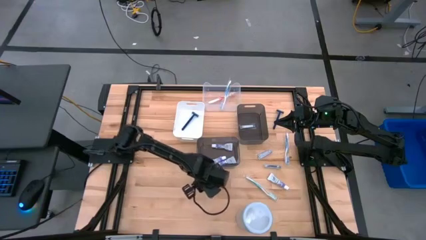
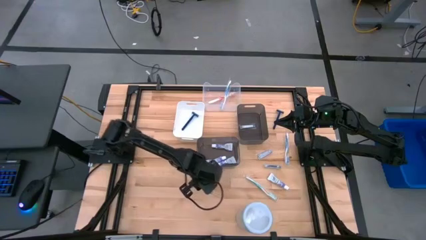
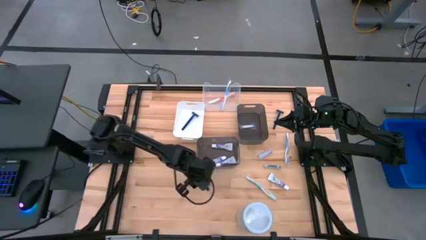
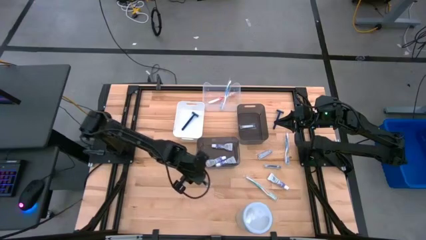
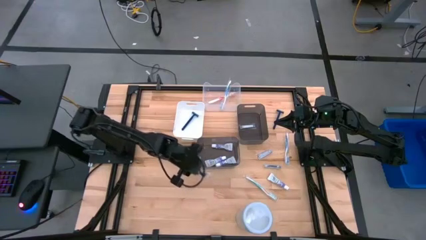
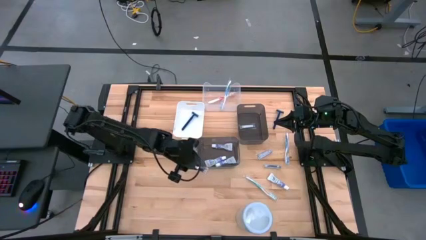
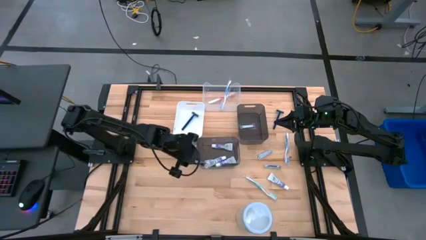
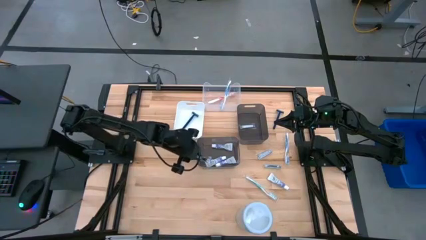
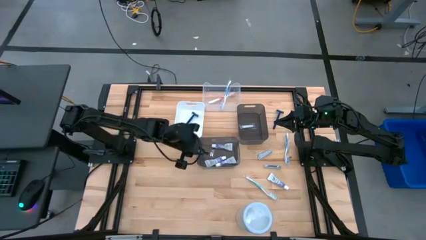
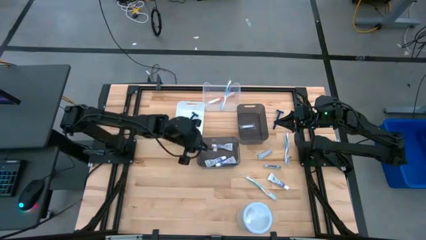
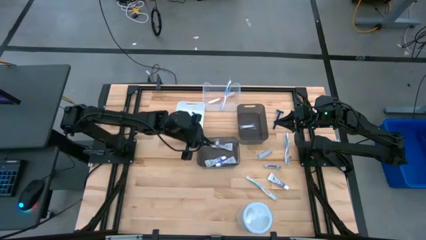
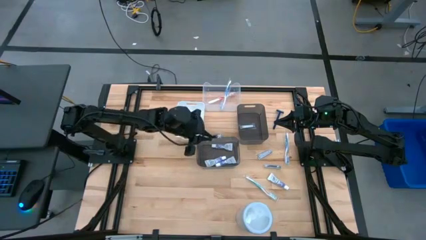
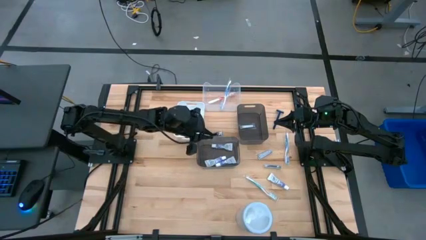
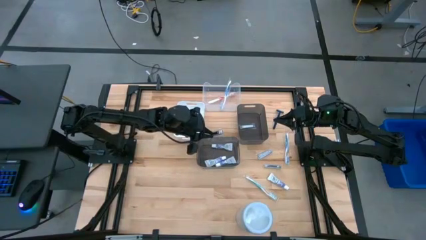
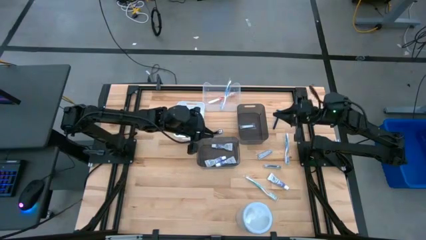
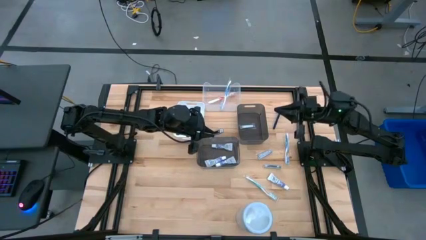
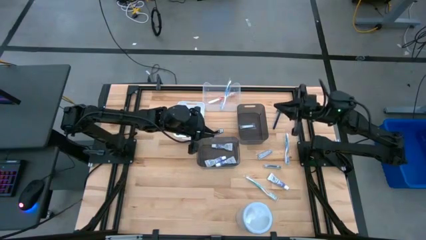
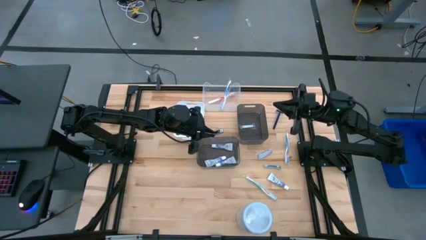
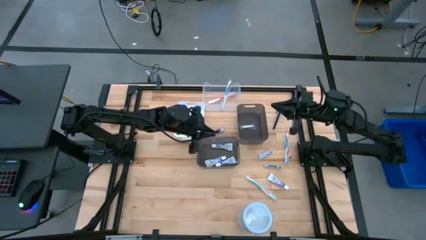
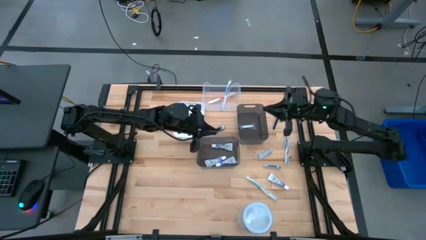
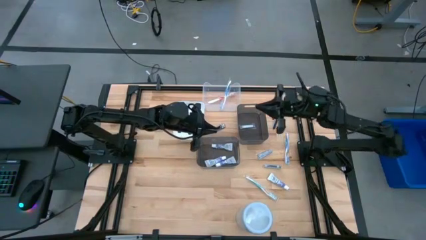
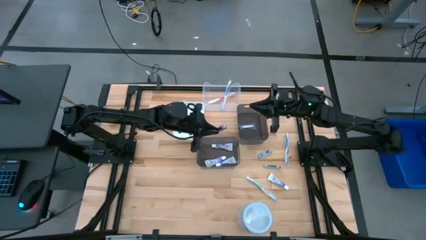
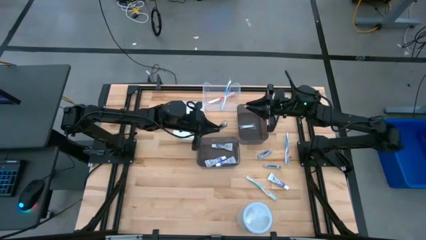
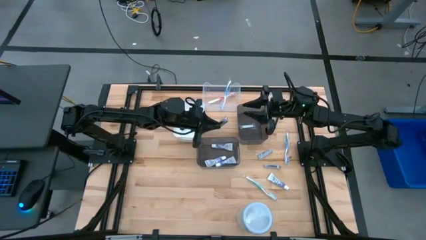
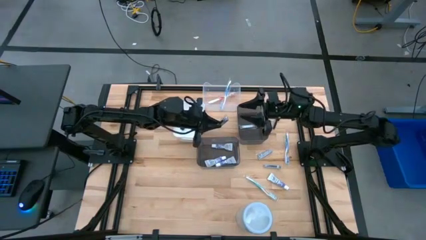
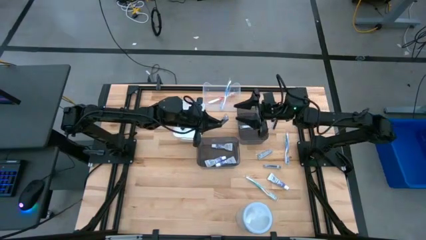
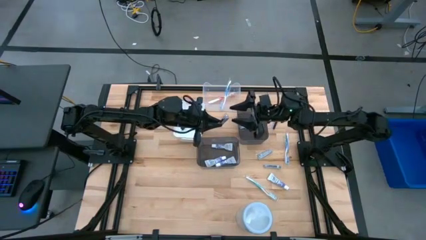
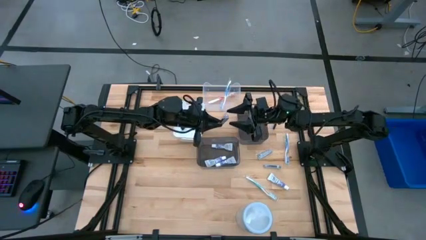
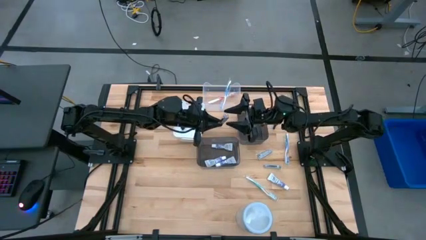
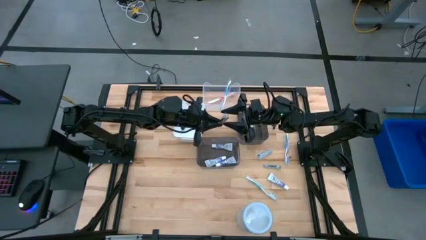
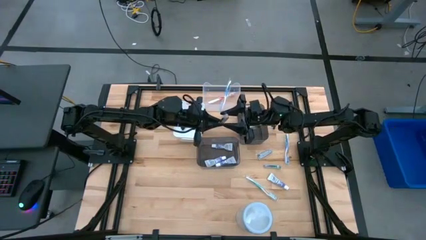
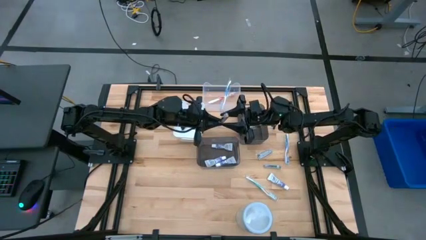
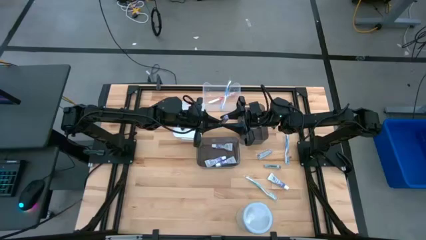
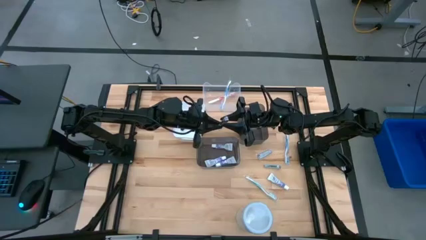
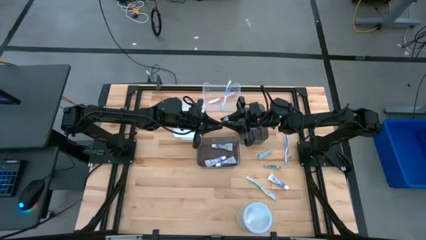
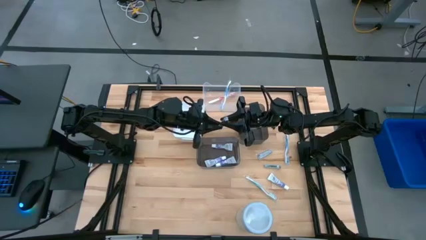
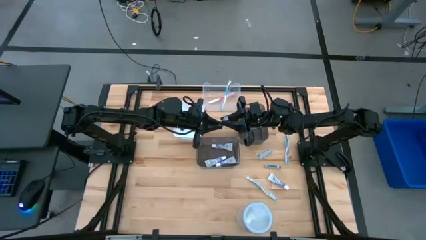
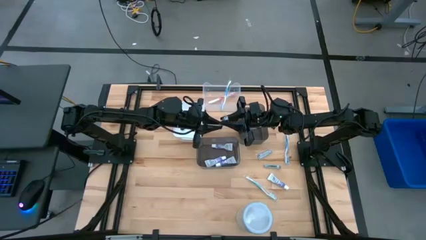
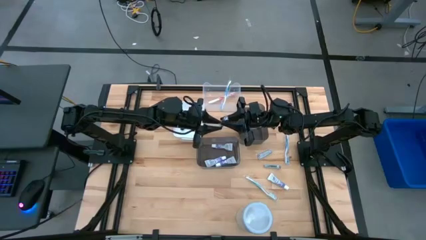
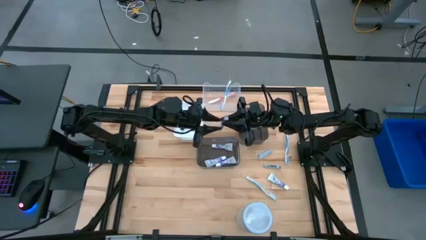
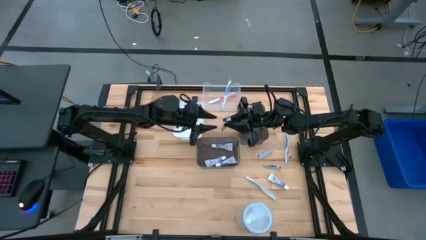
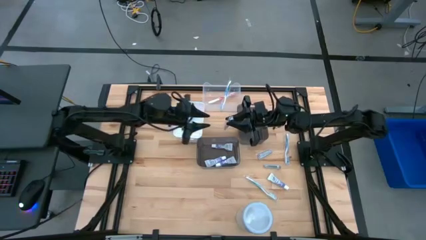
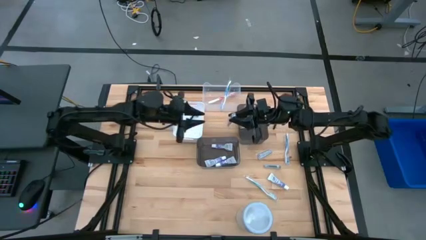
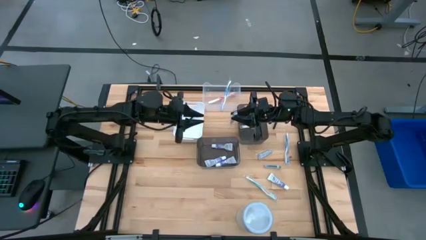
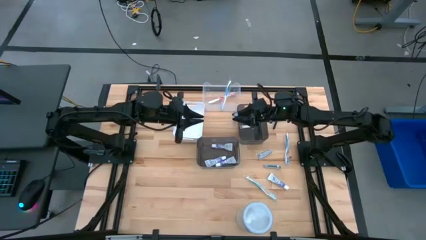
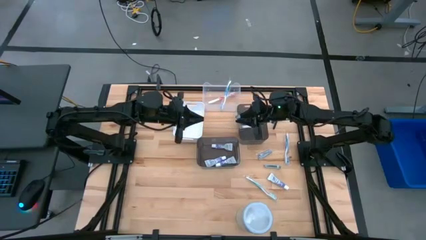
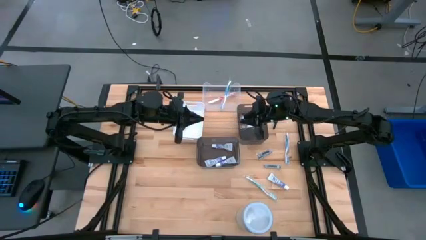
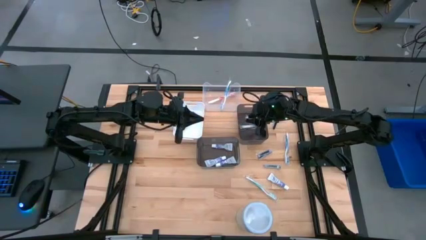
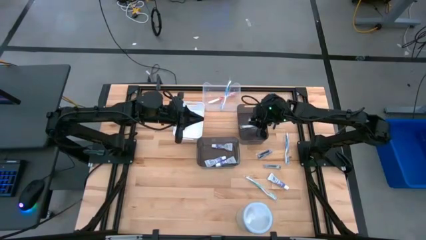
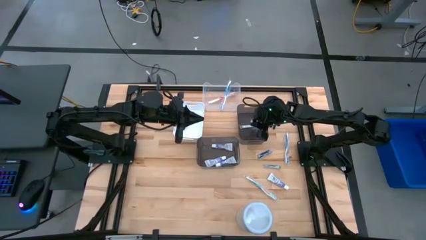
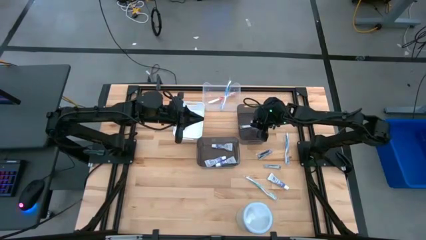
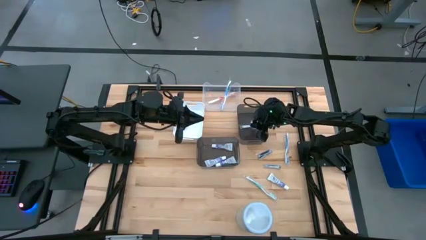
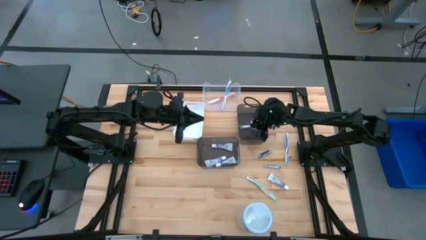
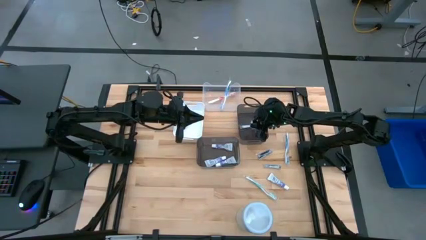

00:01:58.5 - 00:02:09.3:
Task: Pick & Place Travel size toiletries
Put the silver nail cutter into the top black bin
